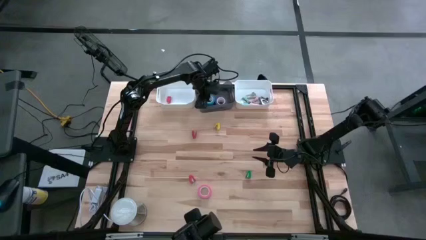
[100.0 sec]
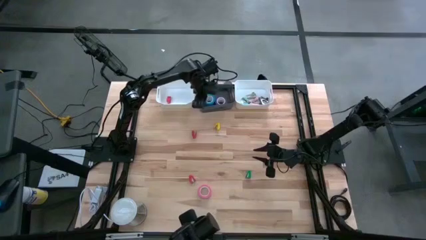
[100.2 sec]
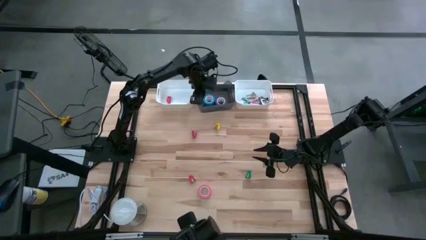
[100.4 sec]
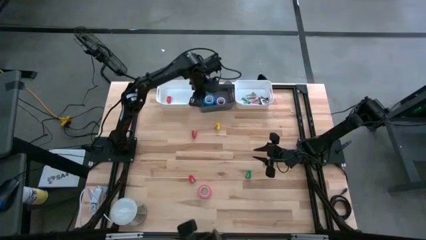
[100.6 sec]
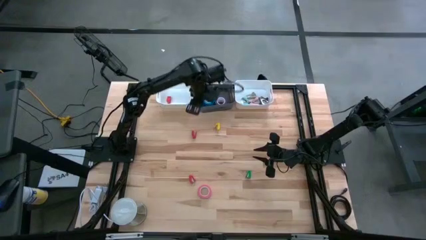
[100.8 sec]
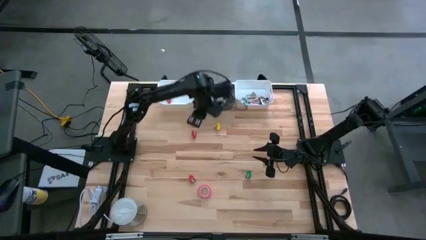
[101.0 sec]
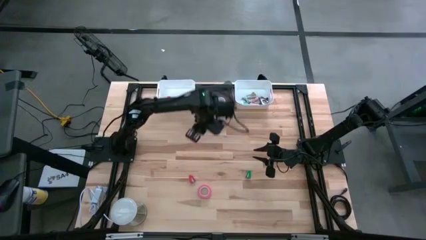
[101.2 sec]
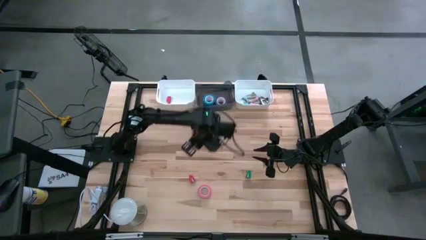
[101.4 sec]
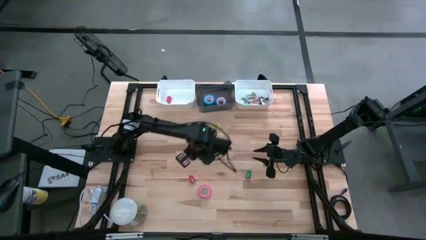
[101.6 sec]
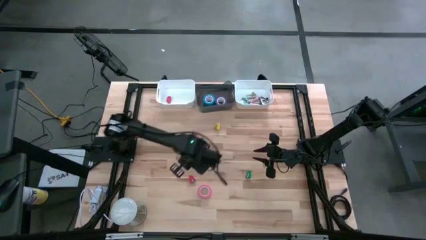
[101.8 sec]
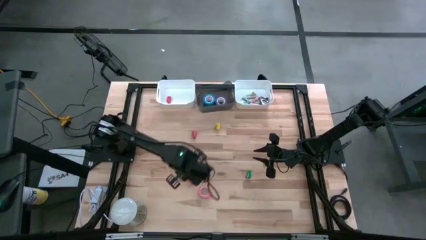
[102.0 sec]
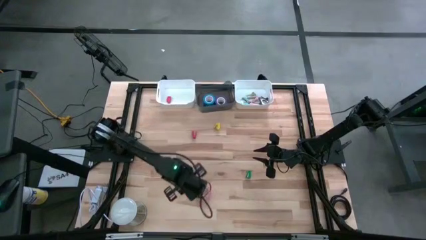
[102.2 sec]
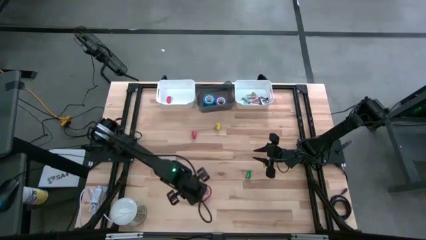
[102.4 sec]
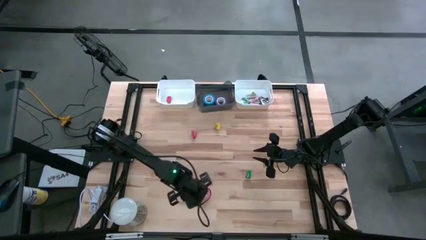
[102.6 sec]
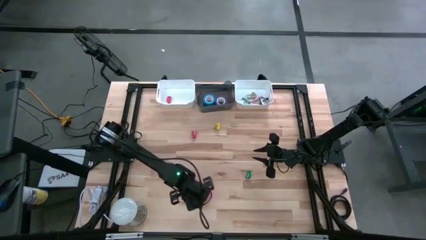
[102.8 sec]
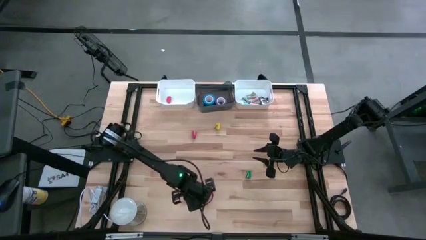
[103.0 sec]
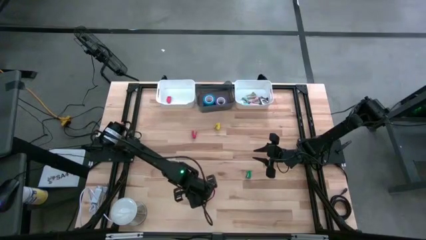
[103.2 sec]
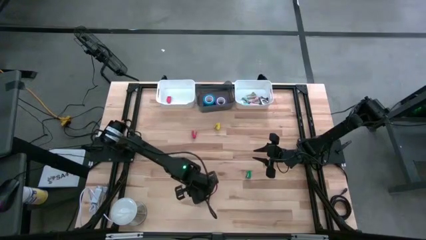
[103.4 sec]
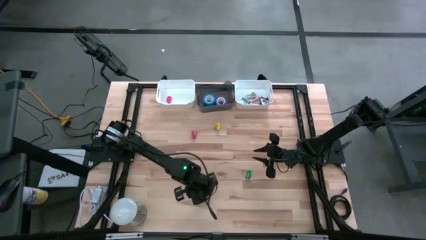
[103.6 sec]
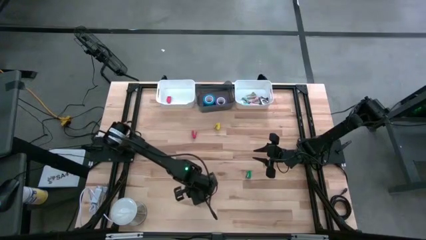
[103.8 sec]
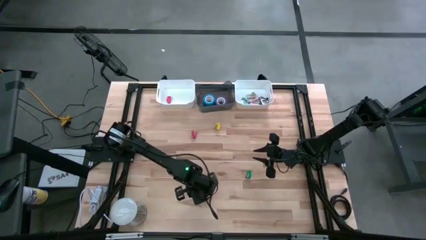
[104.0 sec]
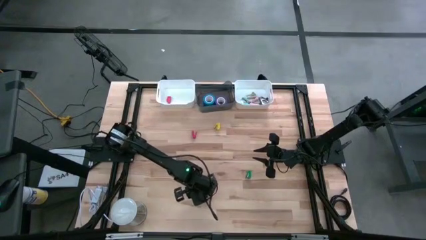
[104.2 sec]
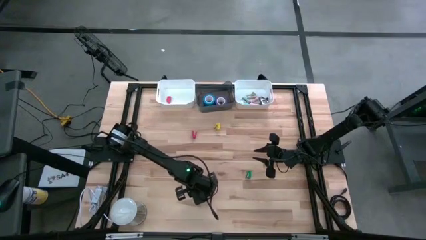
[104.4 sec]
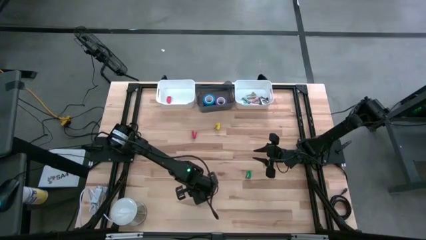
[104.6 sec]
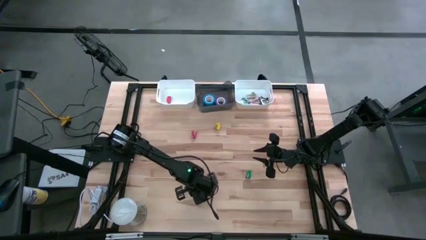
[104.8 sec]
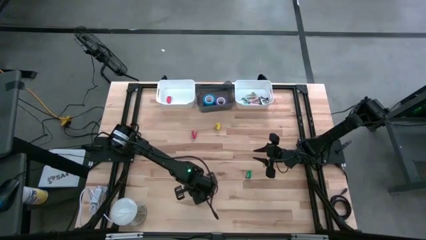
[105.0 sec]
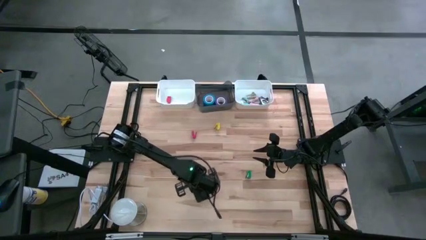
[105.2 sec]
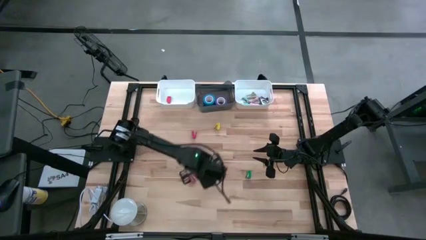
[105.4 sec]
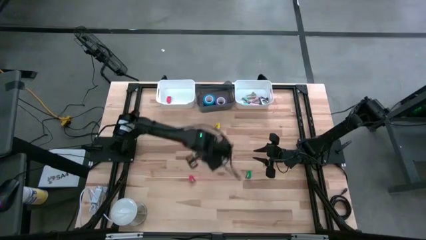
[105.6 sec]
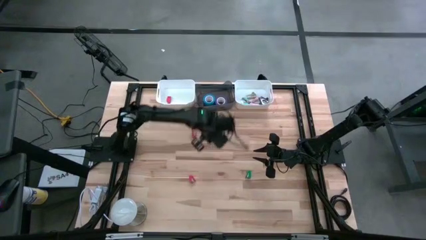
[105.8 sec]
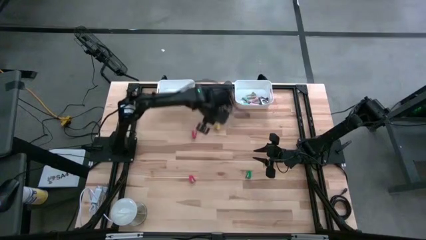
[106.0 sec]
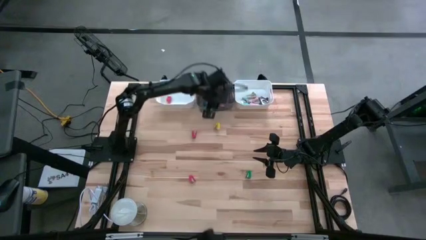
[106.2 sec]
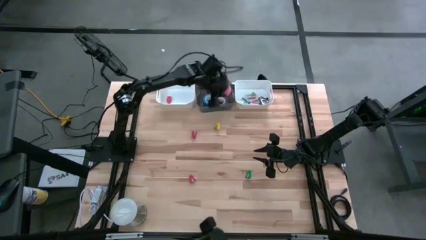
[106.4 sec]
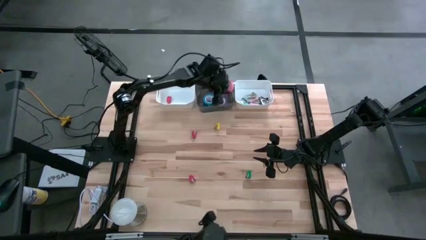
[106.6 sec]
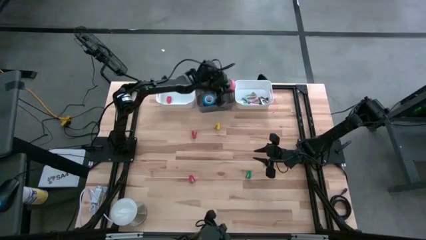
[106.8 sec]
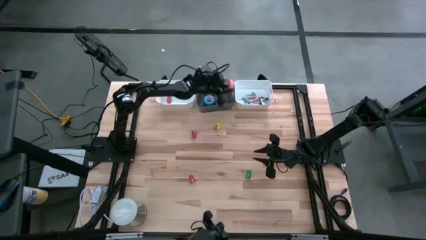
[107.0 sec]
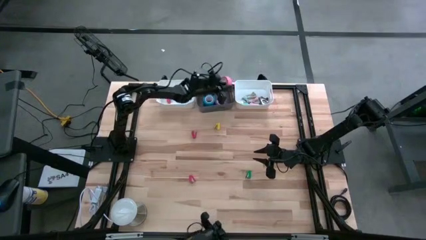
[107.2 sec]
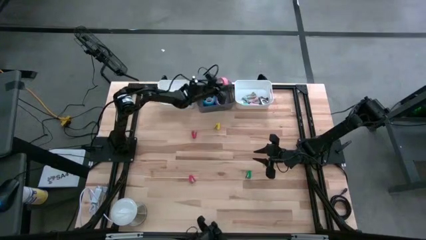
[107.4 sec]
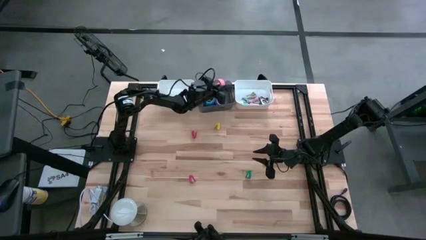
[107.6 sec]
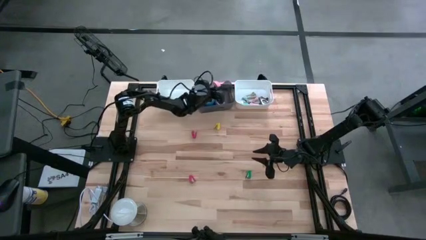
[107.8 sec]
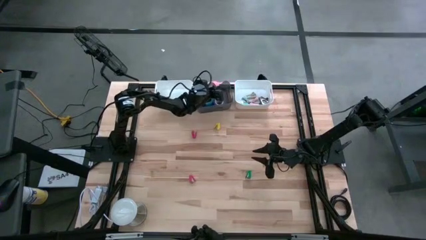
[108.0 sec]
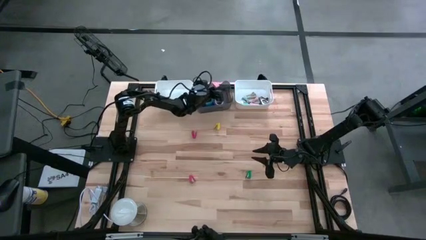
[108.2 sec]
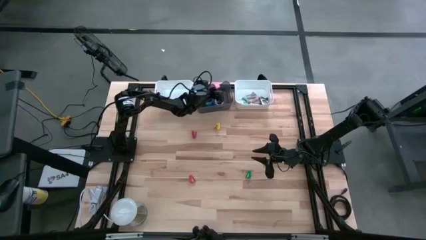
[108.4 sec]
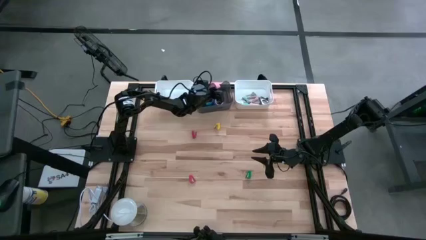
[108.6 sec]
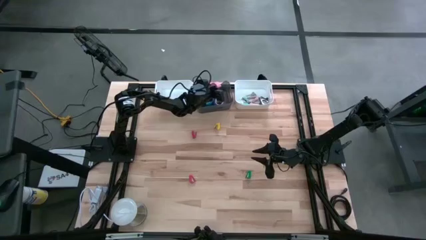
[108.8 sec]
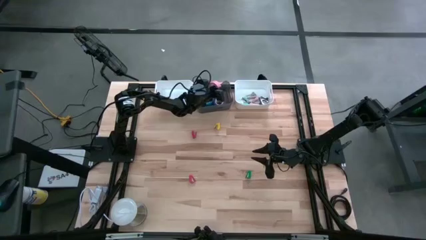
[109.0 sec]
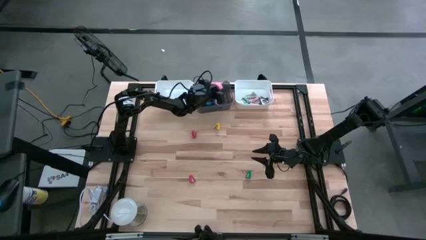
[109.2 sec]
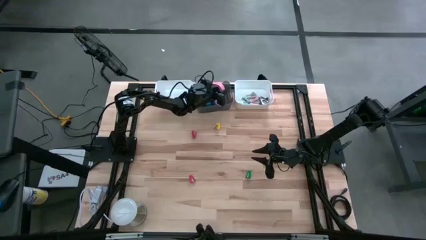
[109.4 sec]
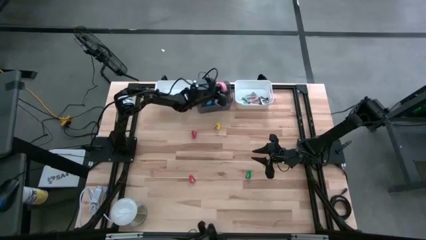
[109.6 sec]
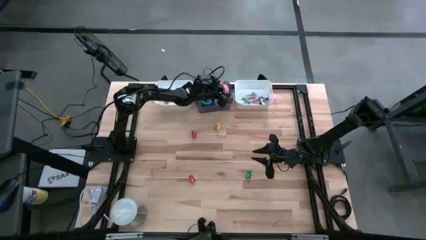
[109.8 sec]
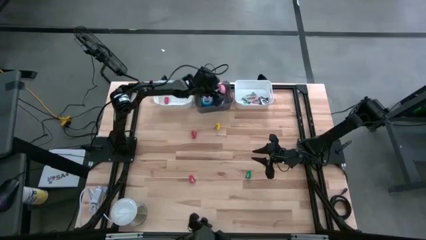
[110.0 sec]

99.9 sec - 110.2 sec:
Task: Pick and place Stapler, Stapler remover, tape
Put the pink tape into the black bin

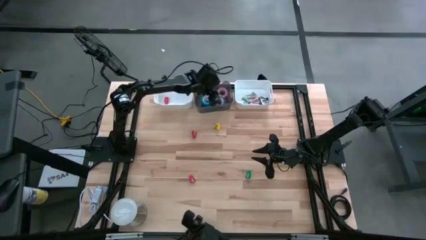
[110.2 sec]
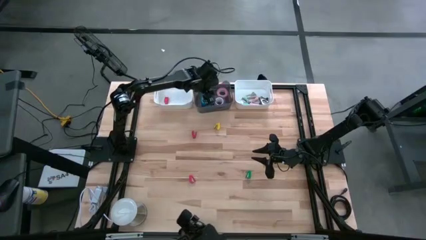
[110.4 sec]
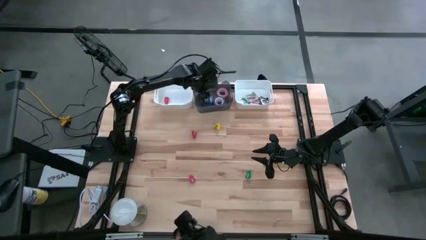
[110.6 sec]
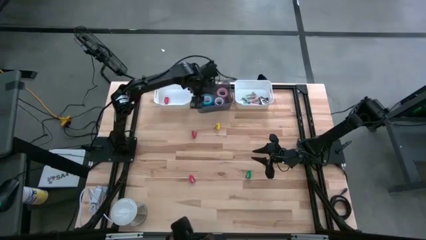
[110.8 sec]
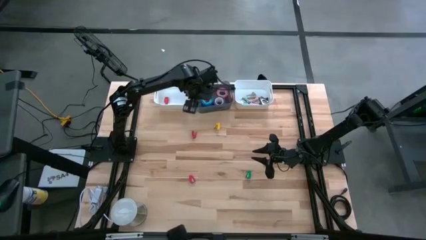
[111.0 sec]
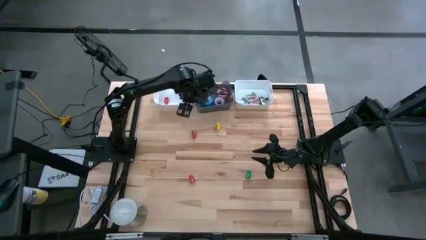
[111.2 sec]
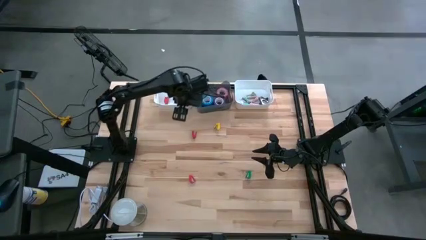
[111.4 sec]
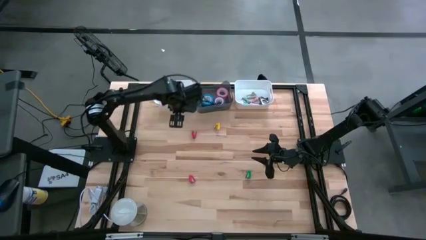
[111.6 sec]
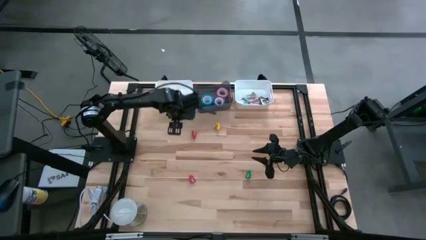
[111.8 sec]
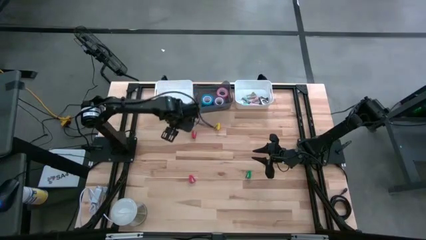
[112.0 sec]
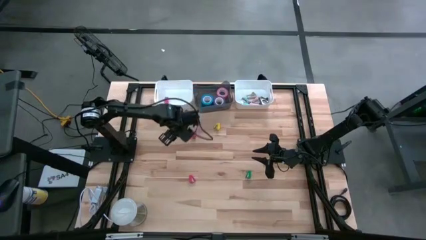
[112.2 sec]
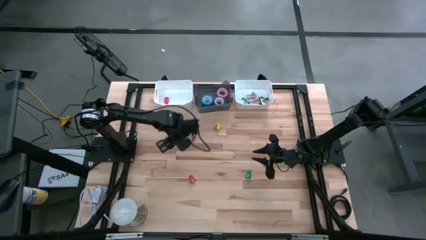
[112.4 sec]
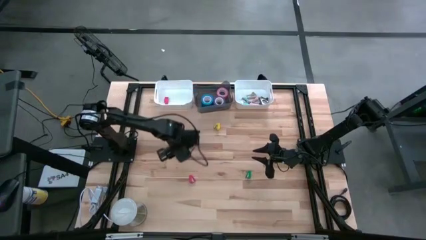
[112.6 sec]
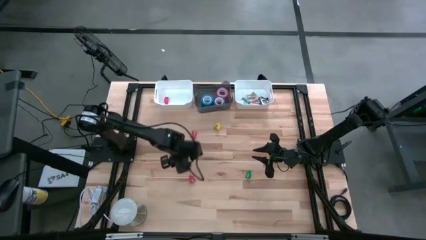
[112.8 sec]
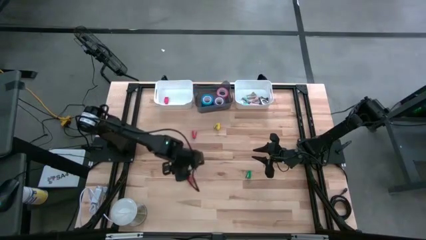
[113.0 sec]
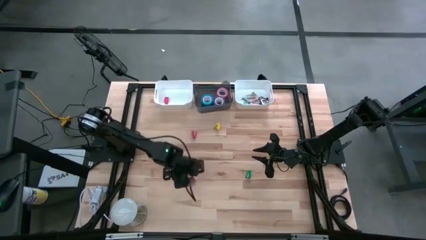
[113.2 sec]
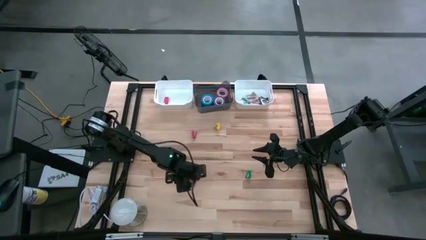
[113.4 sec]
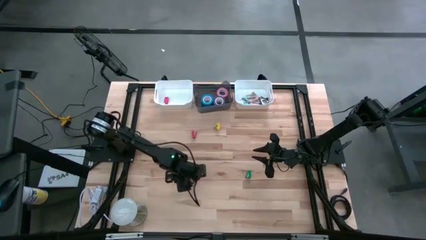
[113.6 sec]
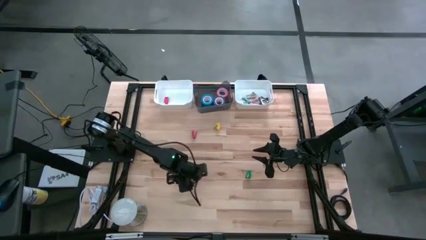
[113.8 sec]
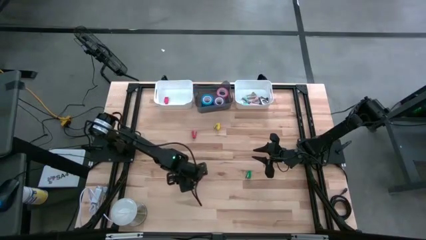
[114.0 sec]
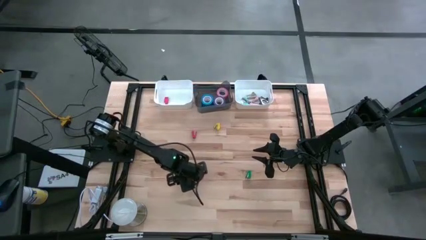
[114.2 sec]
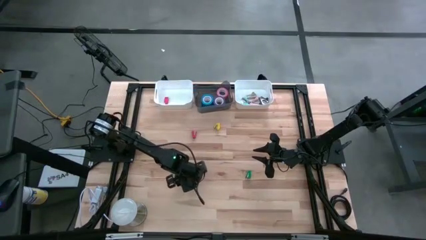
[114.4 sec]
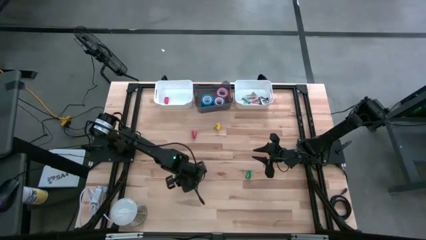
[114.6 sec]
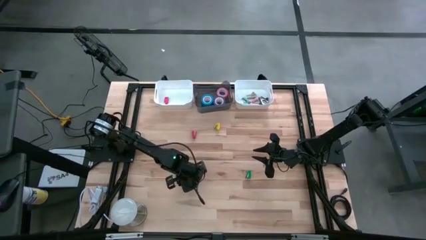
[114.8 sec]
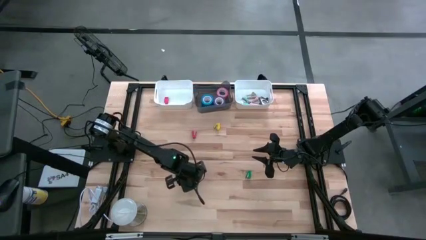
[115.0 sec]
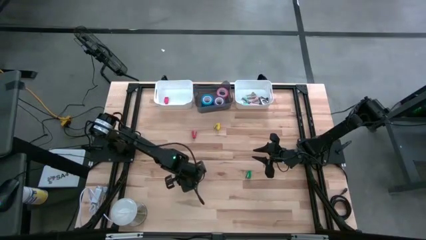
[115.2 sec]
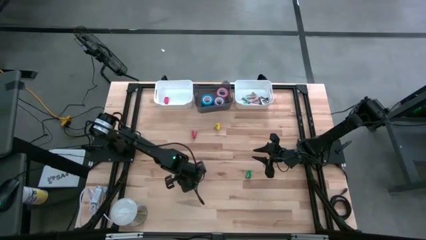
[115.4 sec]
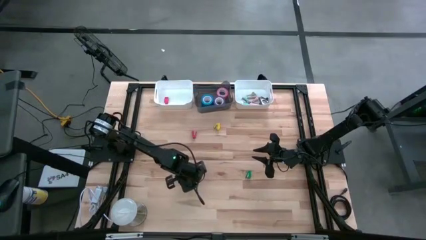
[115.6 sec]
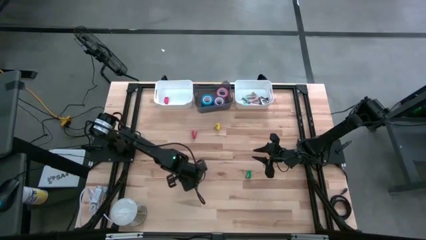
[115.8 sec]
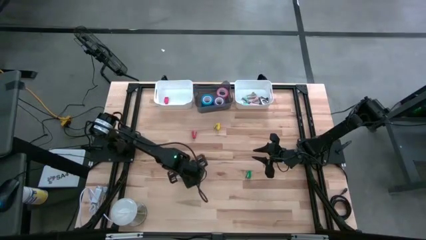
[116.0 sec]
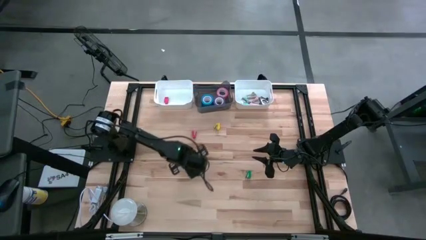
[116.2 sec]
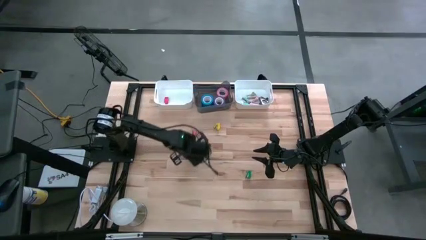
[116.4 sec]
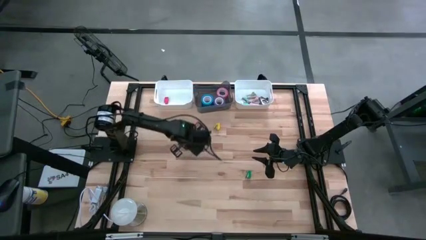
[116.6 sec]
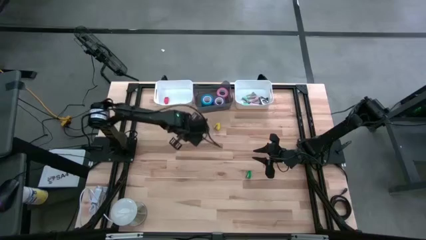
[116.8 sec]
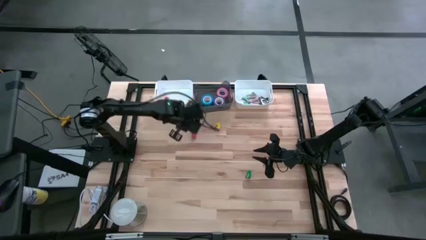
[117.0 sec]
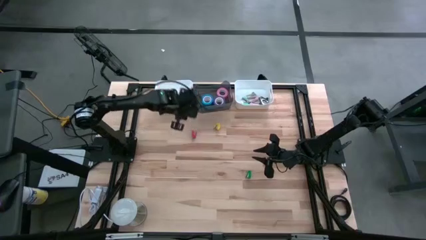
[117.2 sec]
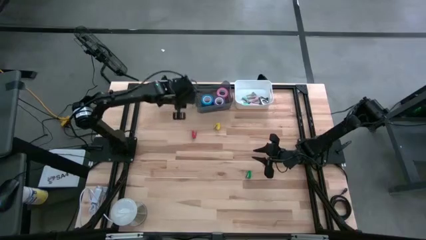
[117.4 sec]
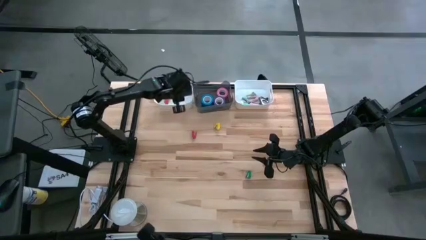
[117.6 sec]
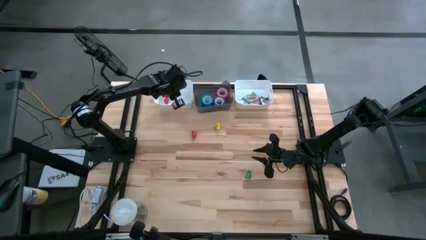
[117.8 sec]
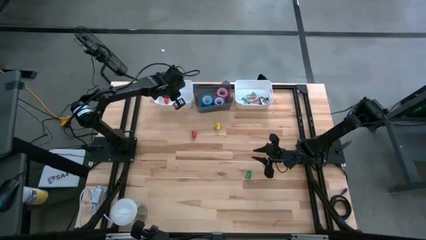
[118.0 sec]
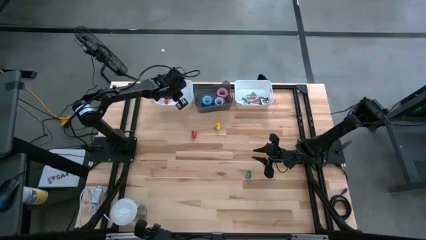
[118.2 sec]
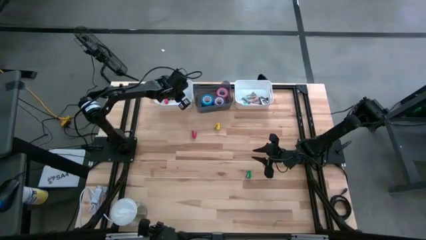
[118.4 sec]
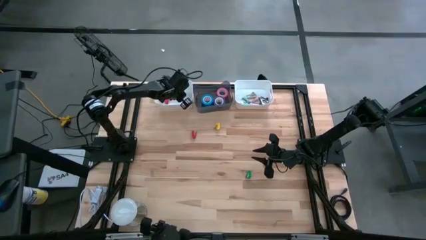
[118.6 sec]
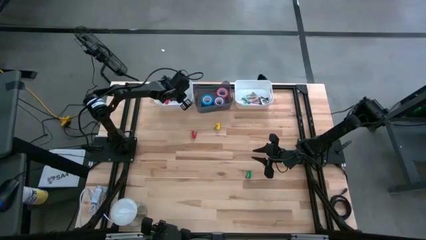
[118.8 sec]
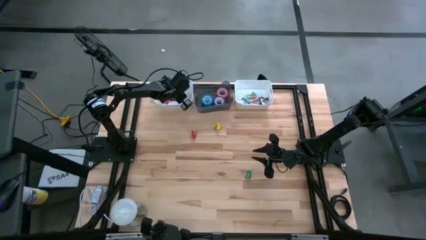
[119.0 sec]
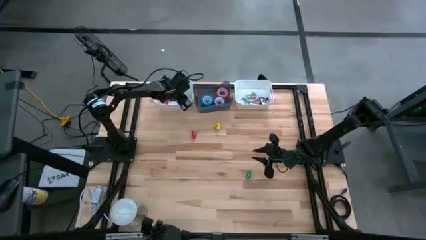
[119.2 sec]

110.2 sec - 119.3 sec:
Put the bottom red stapler into the left white bin
